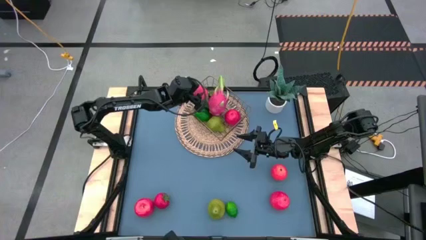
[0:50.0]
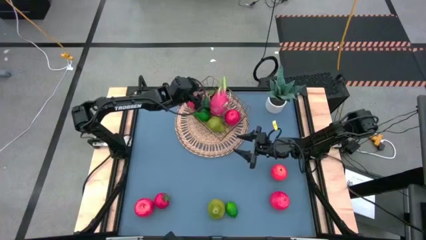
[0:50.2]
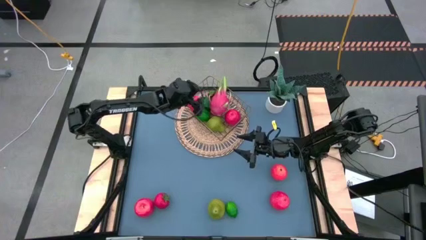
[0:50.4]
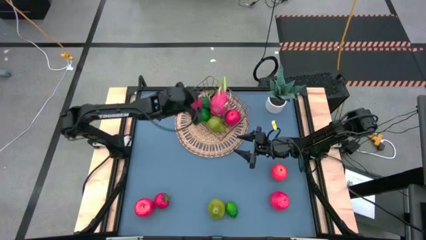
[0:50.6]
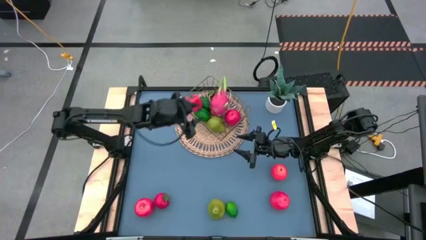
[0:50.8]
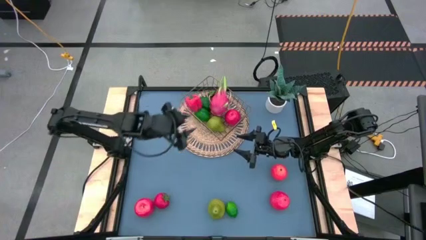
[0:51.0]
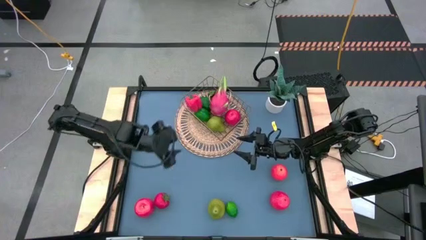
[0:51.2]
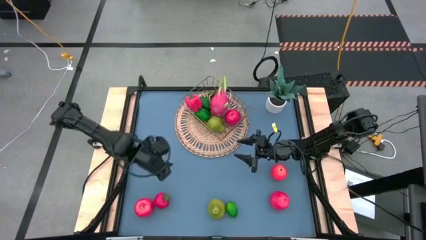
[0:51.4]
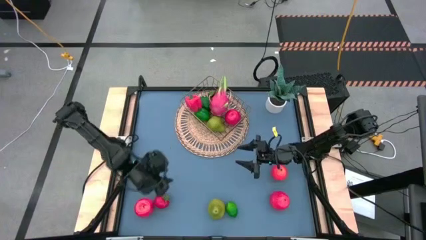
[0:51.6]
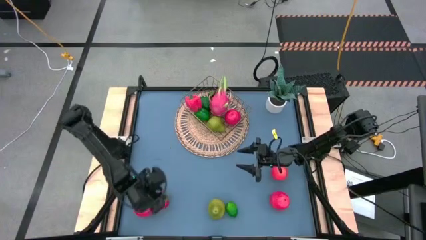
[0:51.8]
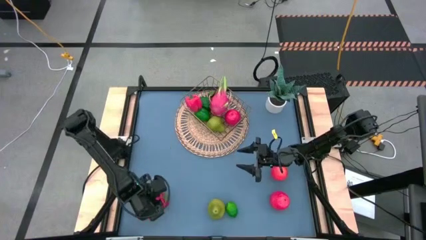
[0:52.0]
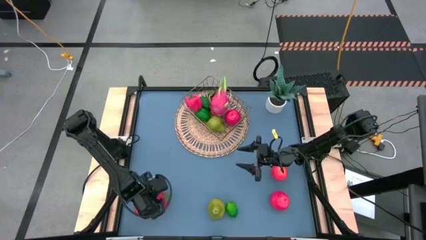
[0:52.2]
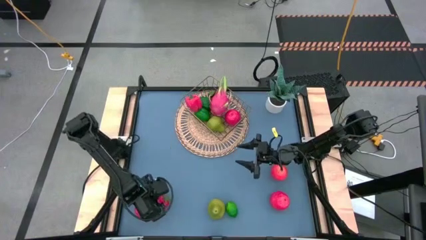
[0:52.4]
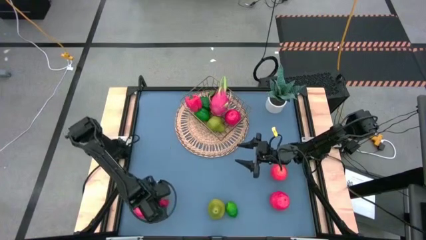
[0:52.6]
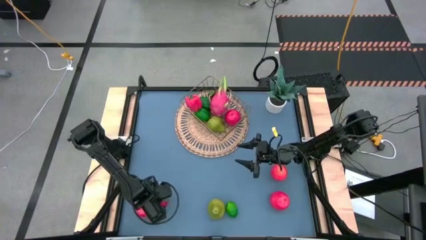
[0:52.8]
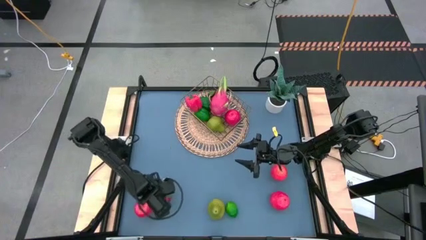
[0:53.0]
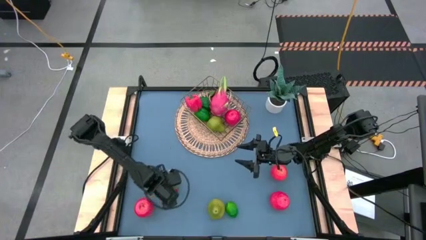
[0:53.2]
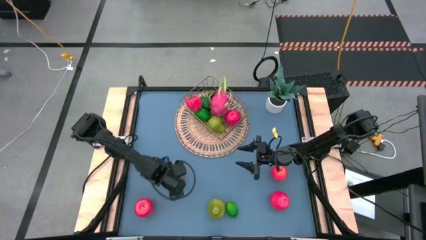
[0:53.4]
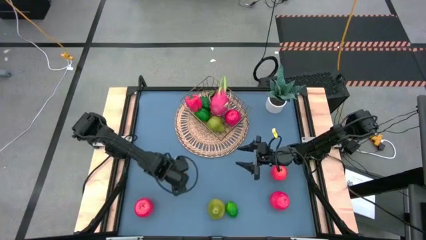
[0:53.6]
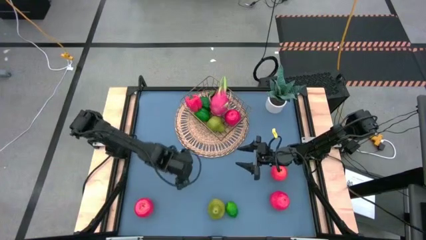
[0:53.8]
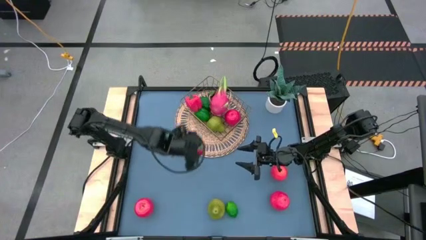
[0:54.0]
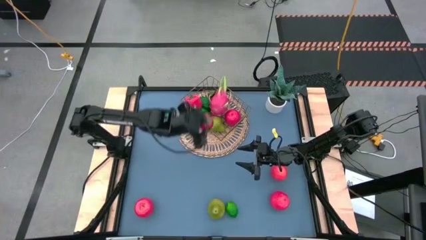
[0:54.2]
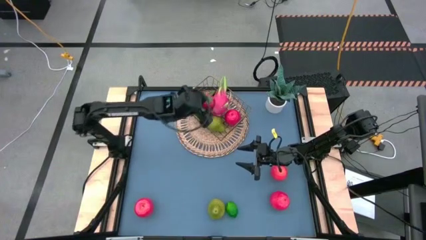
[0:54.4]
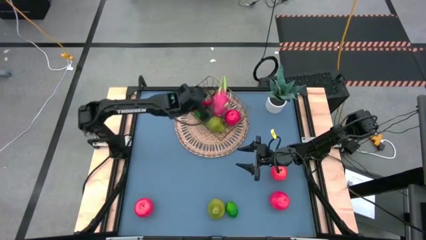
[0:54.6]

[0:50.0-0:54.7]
Task: Build produce basket
Put the red tomato into the gold wire basket

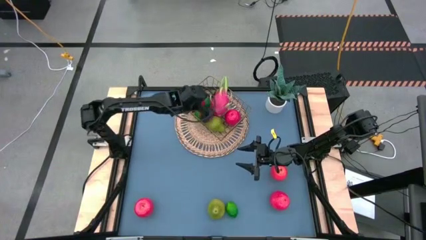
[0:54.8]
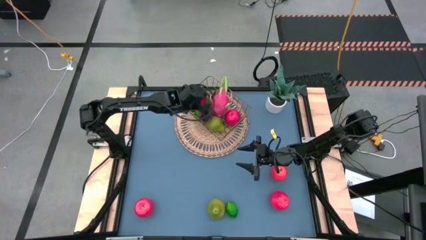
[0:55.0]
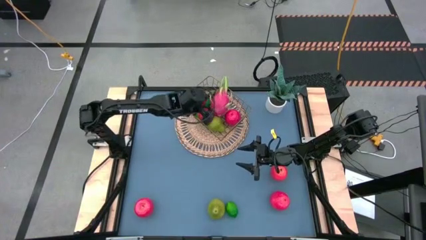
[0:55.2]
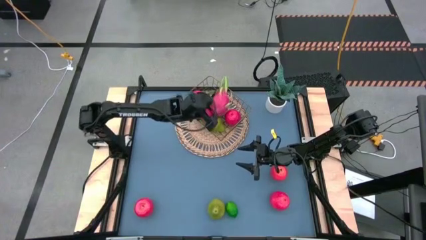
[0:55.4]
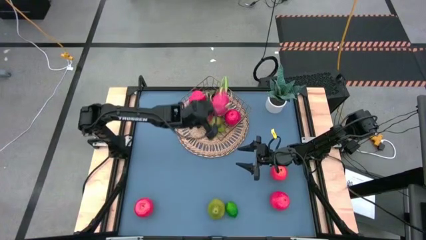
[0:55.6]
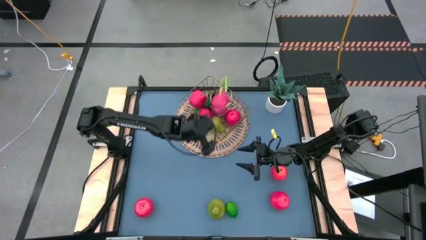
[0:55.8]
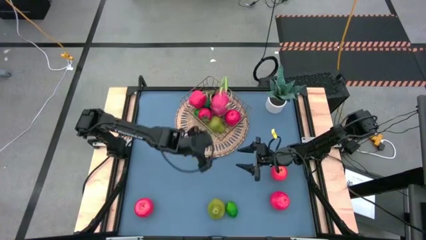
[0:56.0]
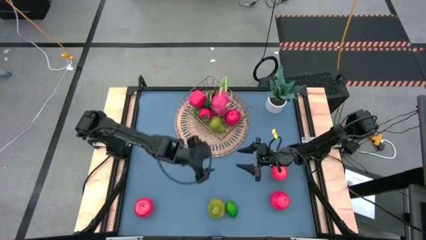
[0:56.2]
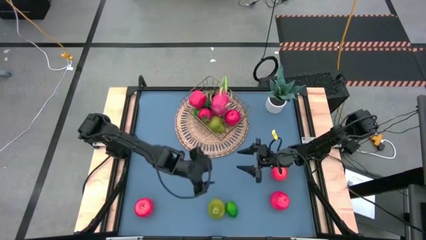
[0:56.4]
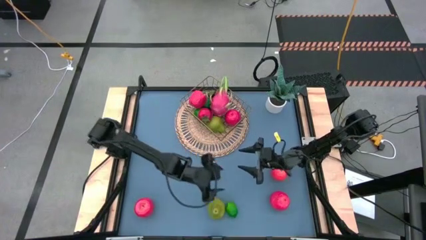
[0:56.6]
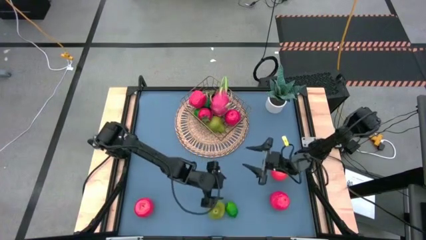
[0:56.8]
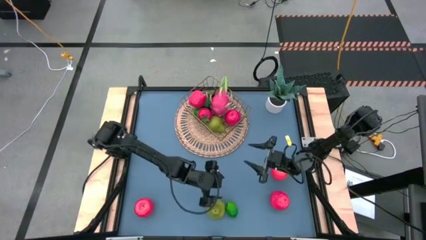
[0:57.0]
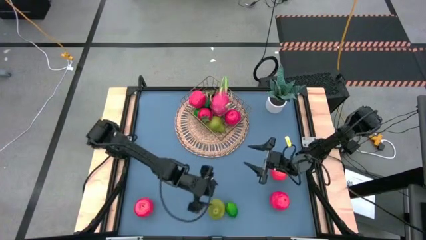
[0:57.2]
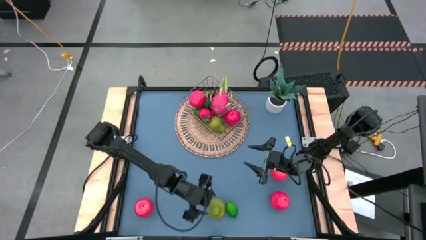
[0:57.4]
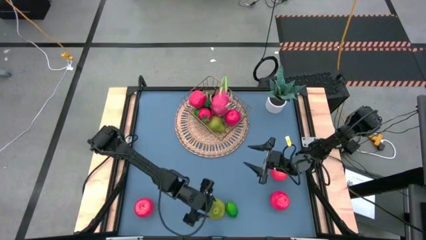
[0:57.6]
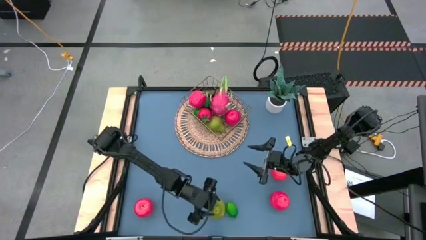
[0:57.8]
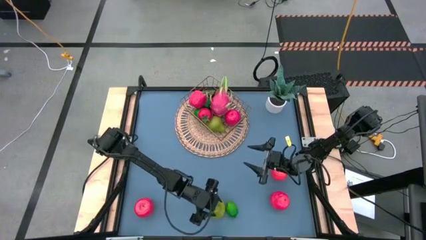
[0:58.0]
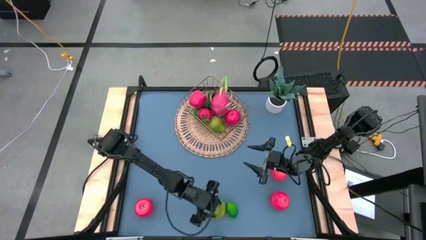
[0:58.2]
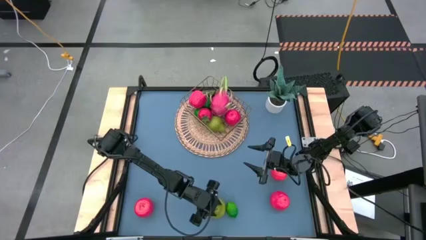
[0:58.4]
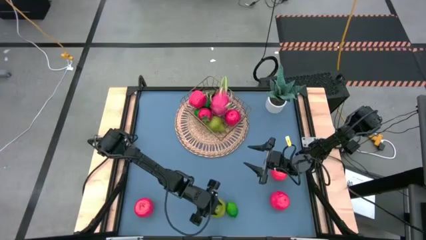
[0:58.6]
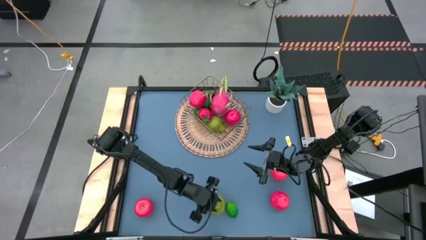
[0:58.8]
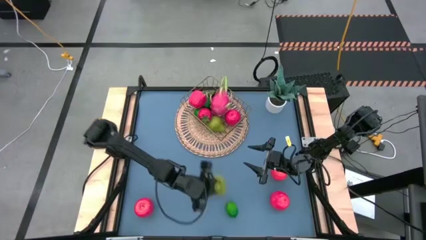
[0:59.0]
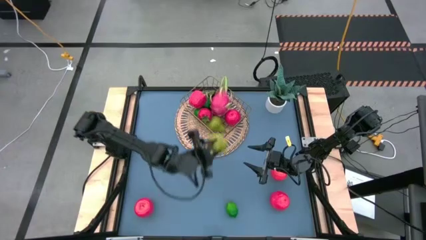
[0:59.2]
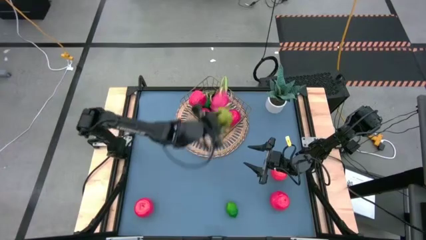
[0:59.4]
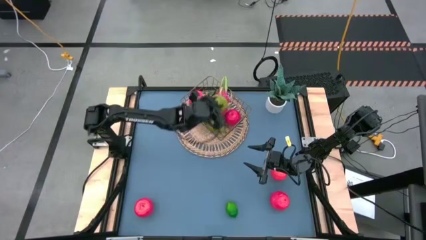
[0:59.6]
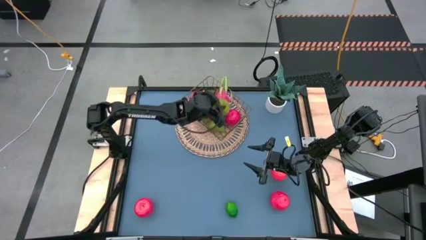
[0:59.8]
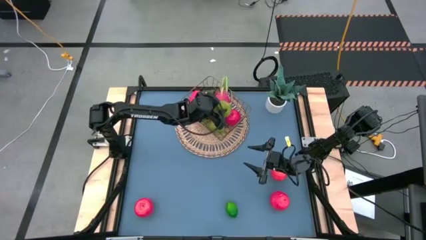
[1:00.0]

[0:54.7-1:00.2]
Put the green pear into the gold wire basket

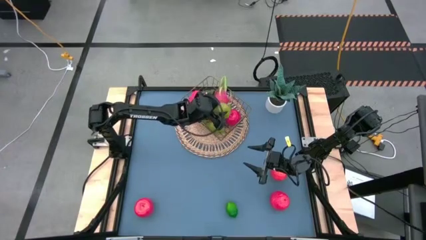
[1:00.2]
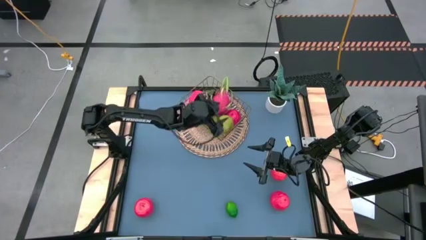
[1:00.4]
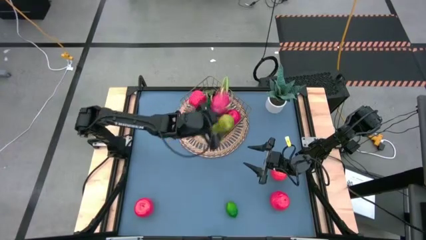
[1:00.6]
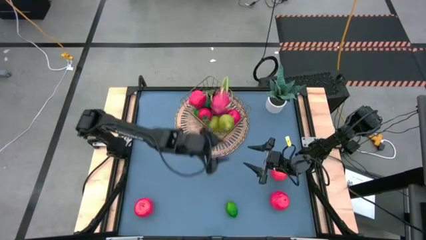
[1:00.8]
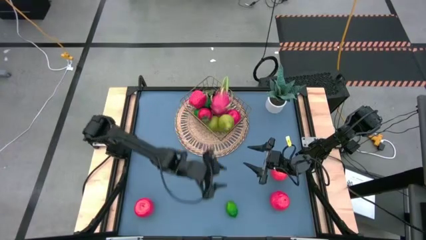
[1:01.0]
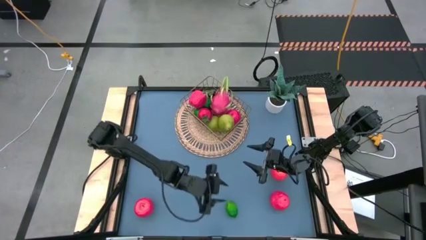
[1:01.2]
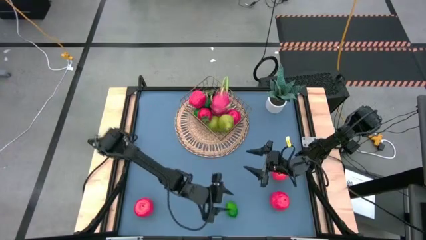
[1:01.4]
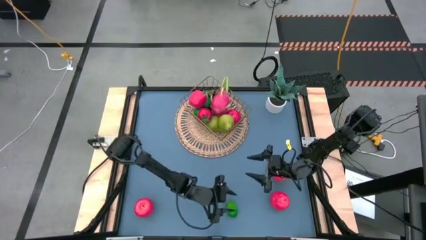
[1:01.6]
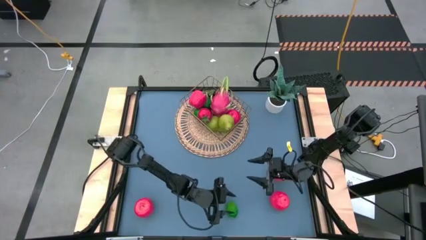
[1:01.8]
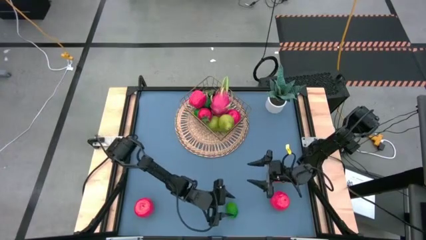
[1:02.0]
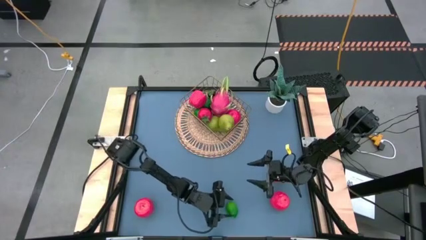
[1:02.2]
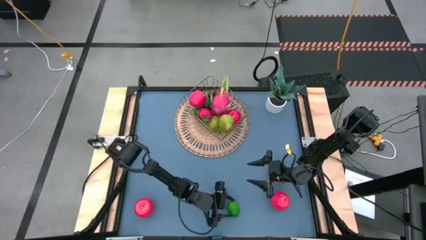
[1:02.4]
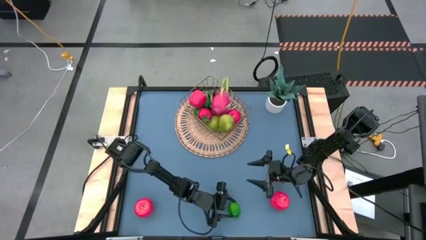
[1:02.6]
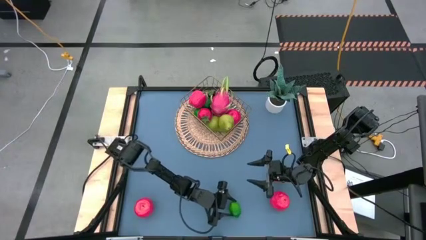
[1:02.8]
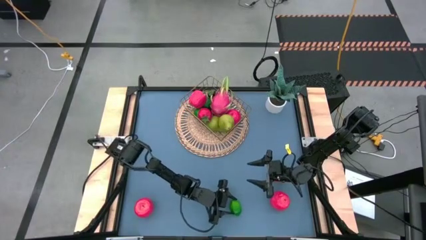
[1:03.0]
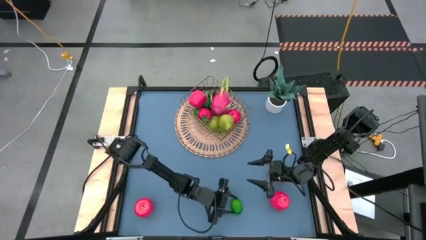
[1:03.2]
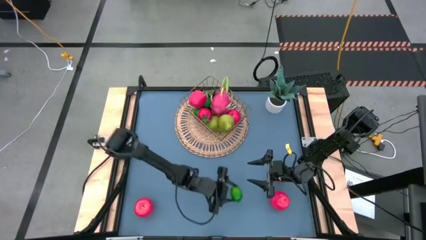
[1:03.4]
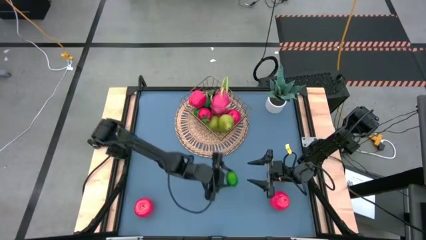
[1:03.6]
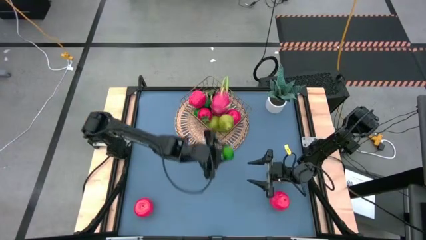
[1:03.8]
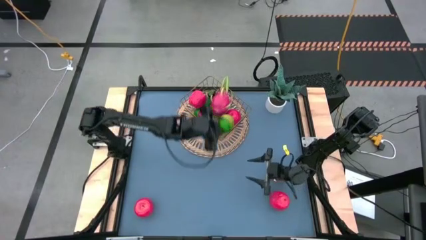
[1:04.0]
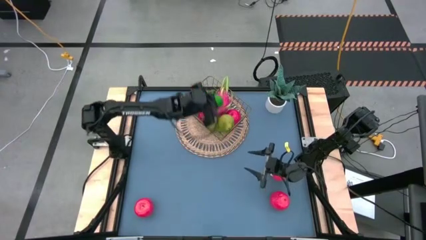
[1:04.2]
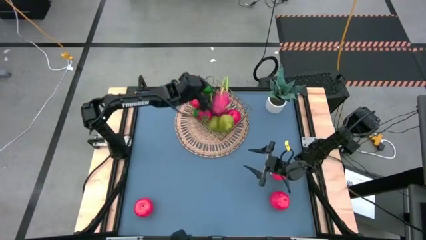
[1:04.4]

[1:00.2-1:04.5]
Put the green lime into the gold wire basket

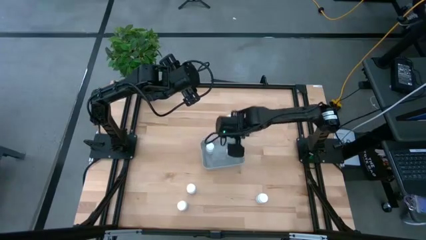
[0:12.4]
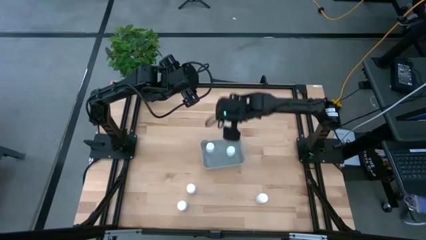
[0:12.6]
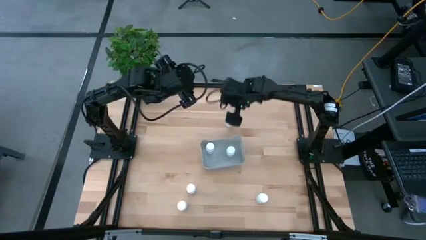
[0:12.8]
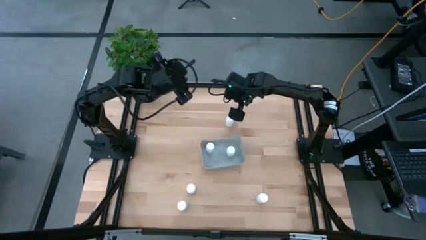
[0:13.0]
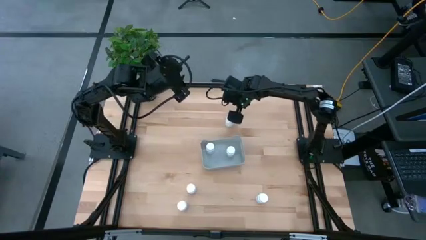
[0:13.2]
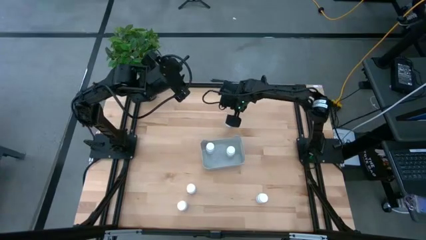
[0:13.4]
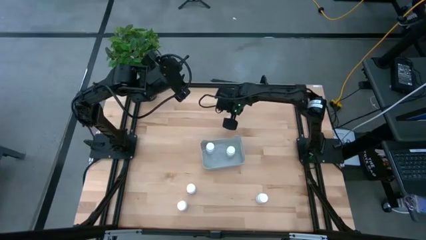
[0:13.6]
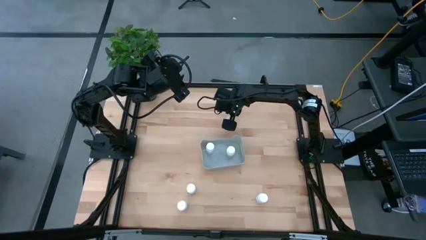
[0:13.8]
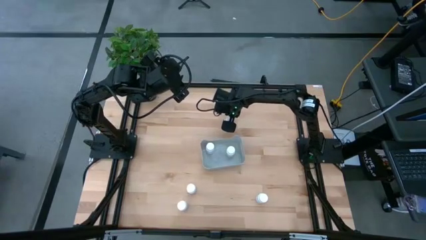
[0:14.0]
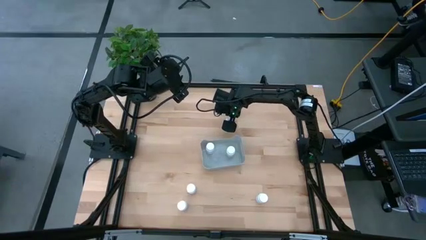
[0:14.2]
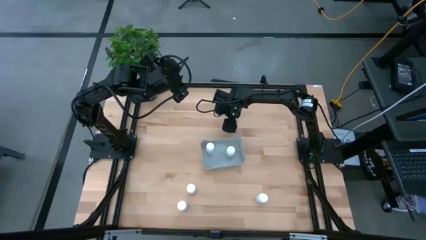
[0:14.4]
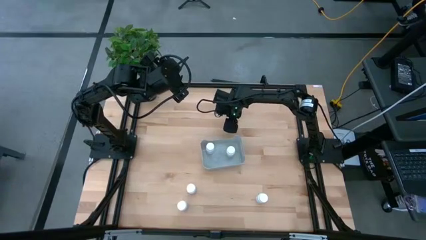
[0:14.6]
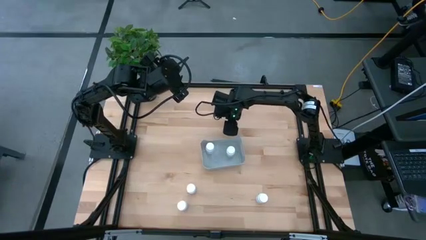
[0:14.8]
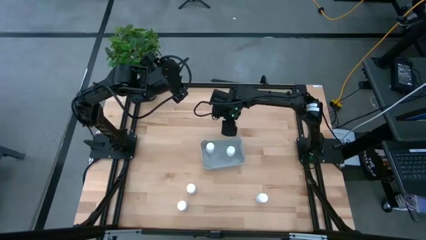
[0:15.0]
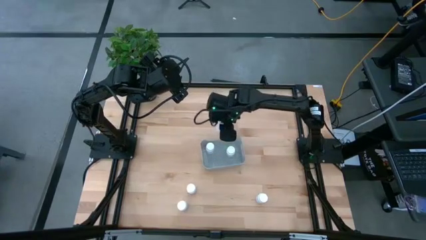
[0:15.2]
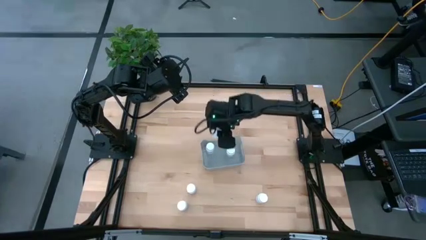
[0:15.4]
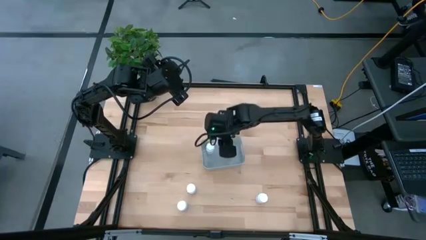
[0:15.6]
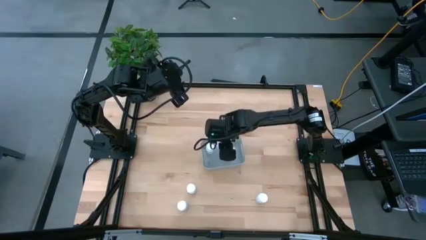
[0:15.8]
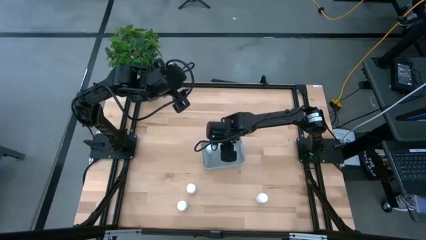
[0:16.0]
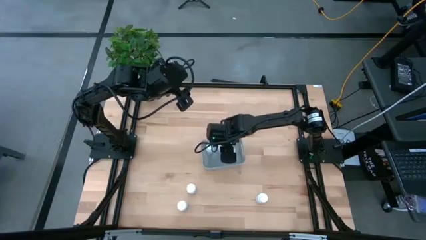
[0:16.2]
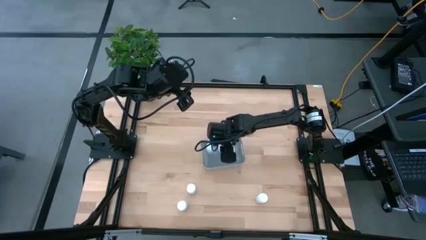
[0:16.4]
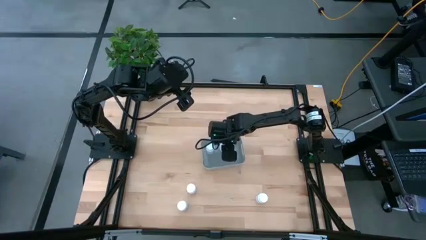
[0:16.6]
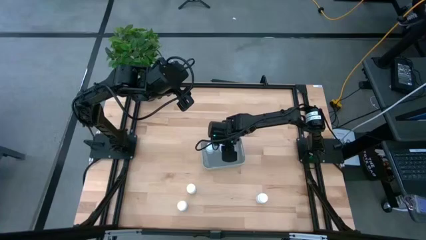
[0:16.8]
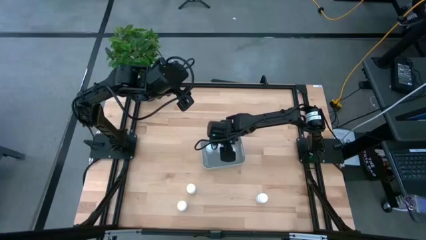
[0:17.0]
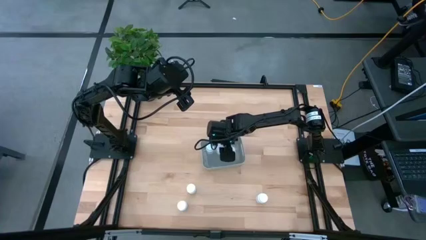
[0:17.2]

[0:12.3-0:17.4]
Task: Pick and place pill bottles into a basket
Put the white medicine bottle into the gray bin
